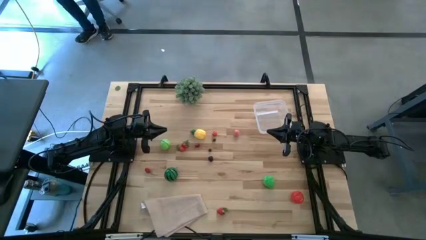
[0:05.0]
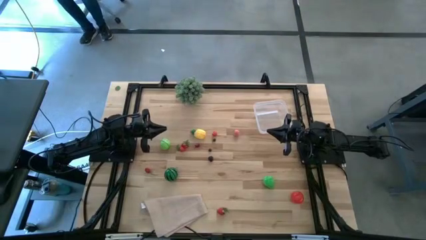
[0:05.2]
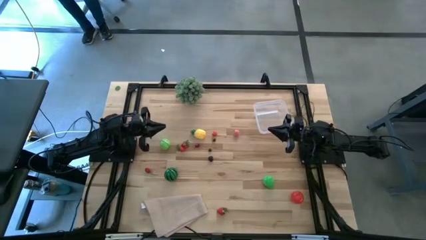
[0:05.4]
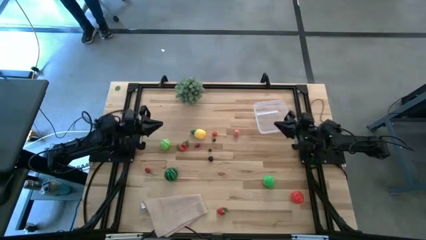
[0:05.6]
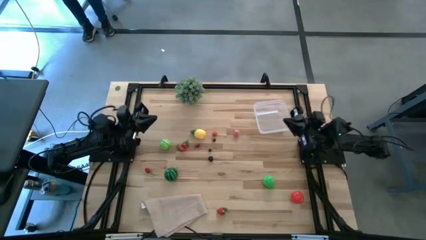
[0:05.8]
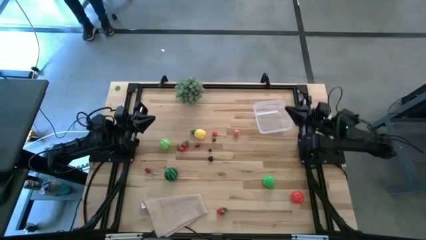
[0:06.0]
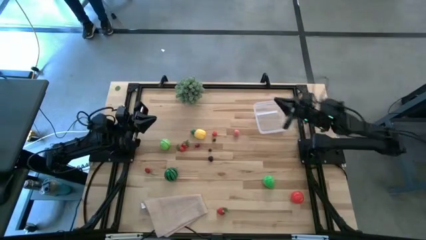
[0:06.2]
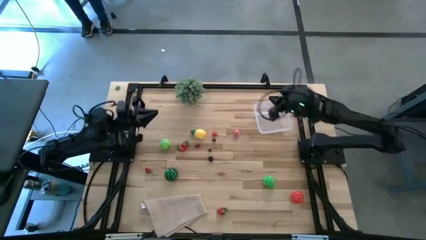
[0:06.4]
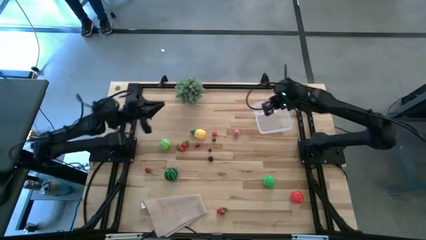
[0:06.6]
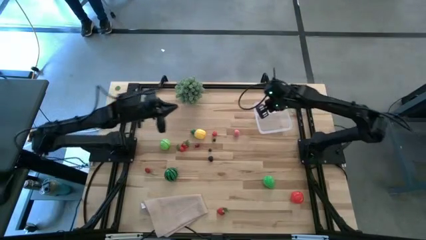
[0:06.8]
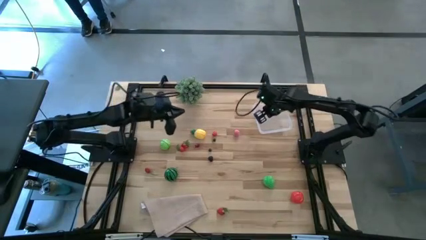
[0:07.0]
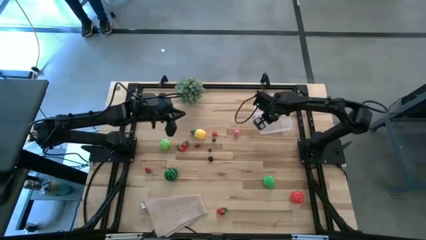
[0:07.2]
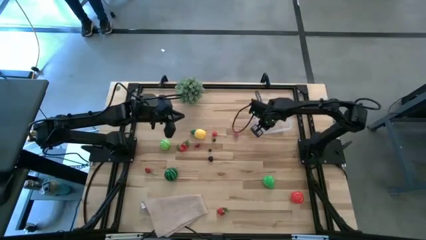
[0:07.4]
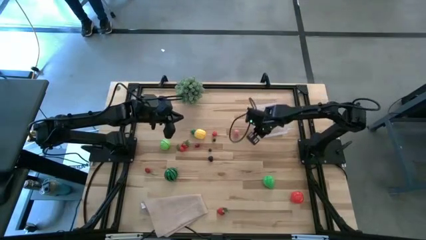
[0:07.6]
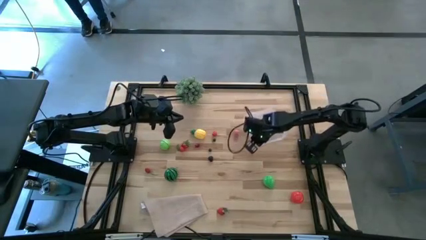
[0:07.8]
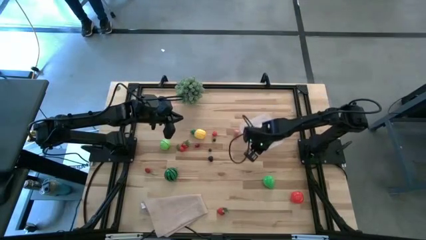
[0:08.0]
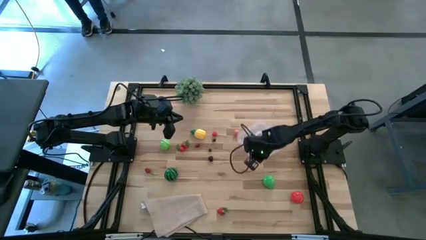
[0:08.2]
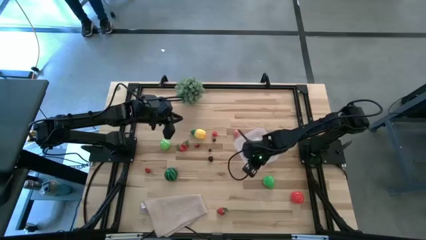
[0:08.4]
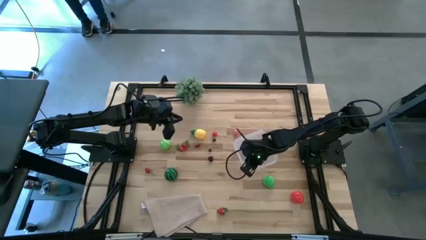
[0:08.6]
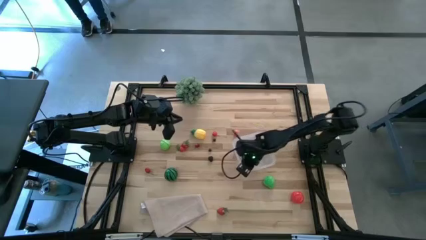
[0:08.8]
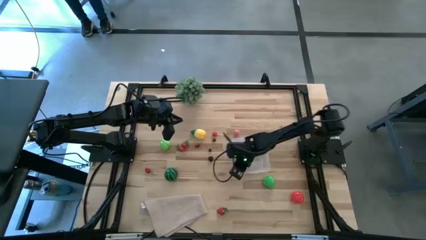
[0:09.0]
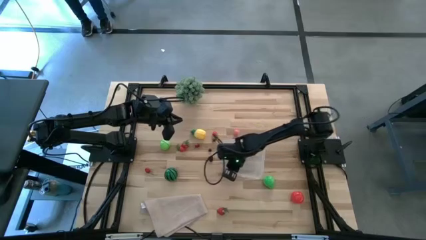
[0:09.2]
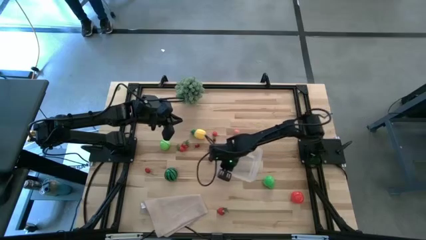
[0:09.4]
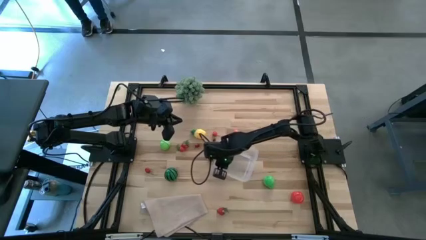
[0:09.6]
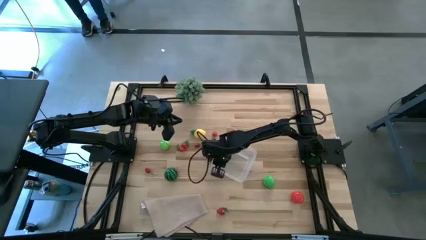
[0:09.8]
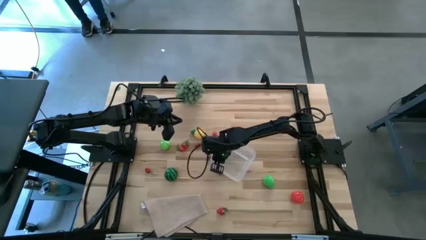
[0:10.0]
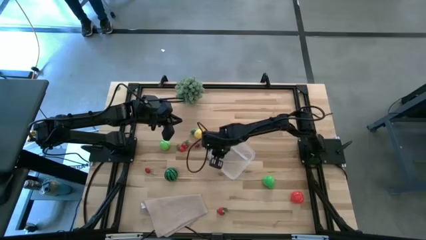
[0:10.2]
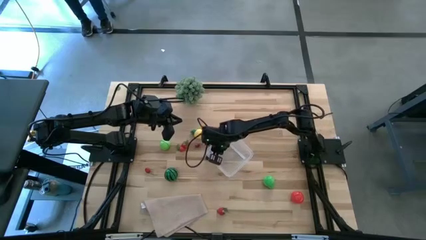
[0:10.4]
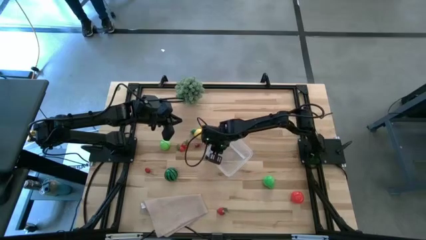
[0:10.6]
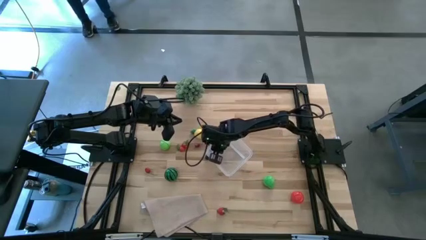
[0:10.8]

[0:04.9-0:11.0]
Task: Pick and placing Produce into tupperware
Move the transparent bin to the center of the table

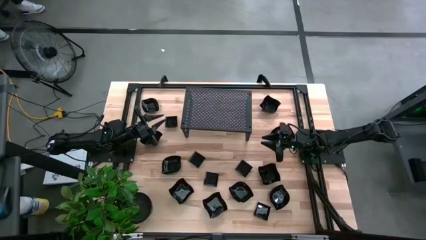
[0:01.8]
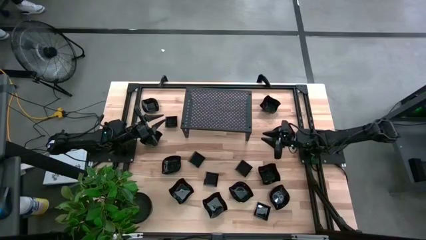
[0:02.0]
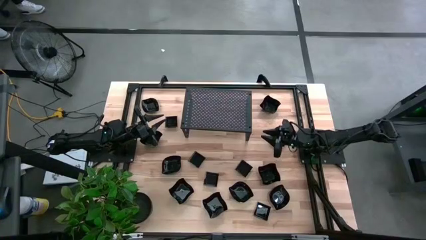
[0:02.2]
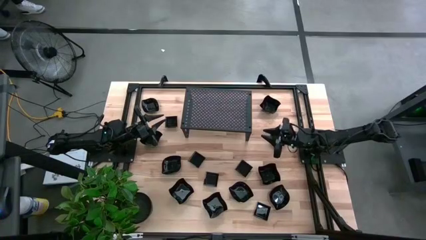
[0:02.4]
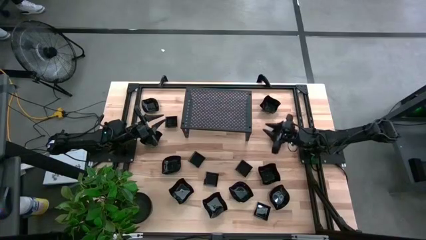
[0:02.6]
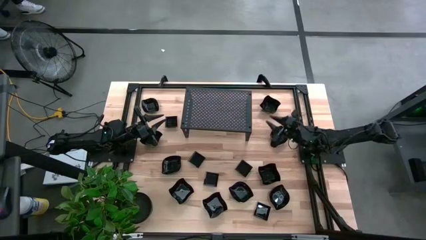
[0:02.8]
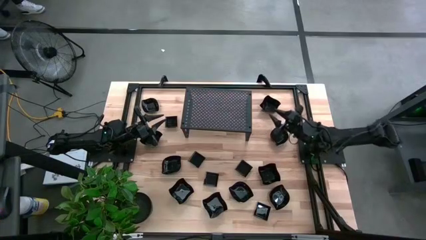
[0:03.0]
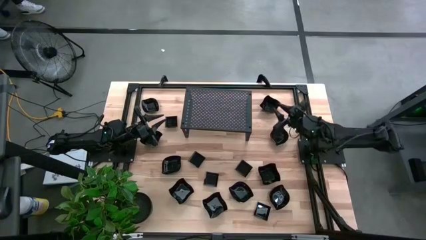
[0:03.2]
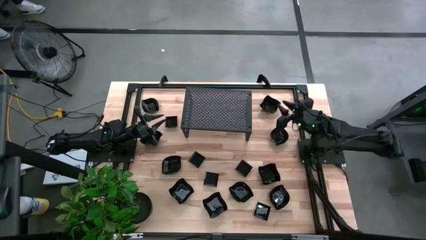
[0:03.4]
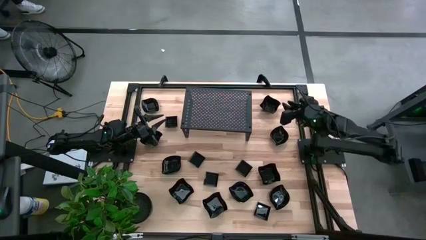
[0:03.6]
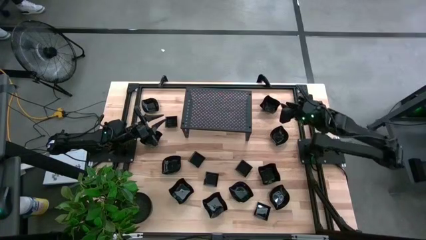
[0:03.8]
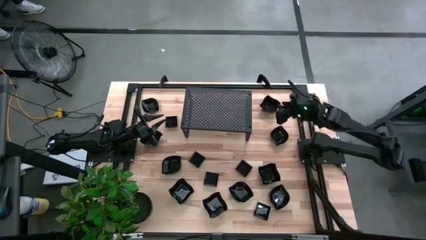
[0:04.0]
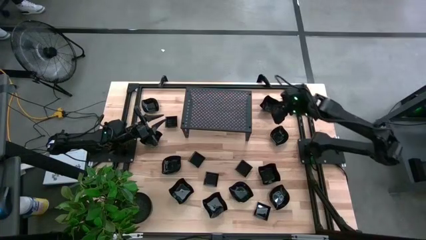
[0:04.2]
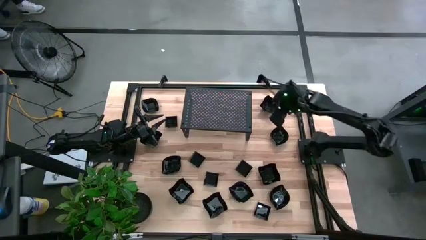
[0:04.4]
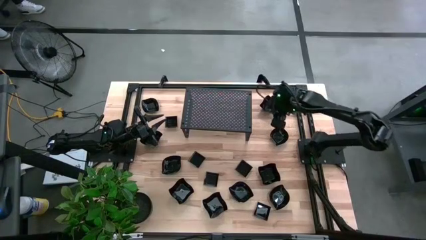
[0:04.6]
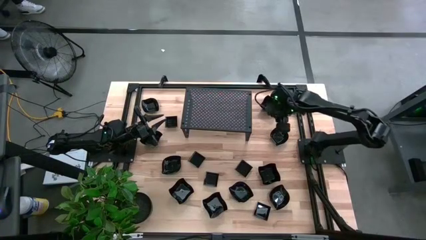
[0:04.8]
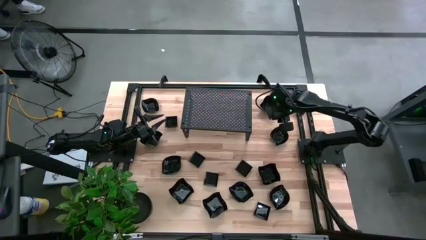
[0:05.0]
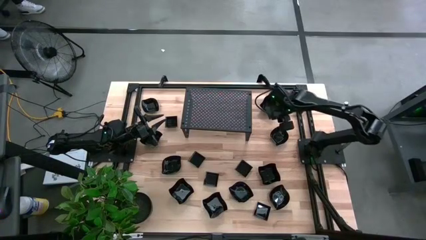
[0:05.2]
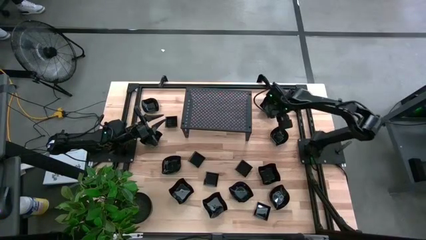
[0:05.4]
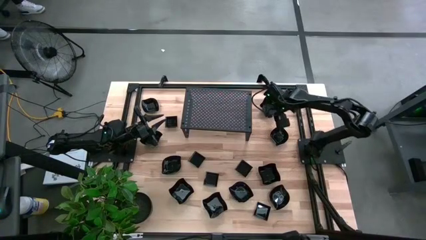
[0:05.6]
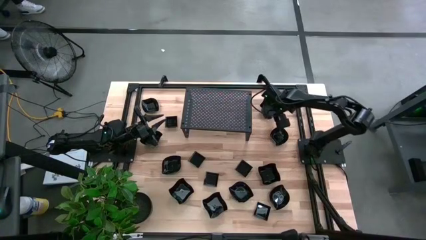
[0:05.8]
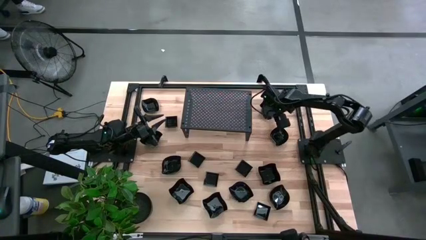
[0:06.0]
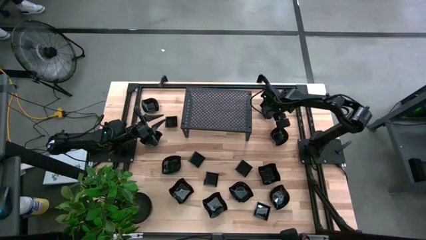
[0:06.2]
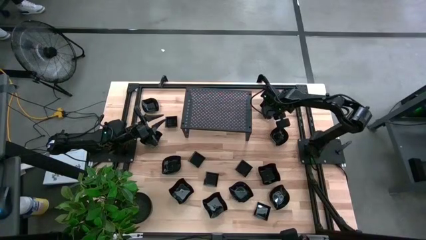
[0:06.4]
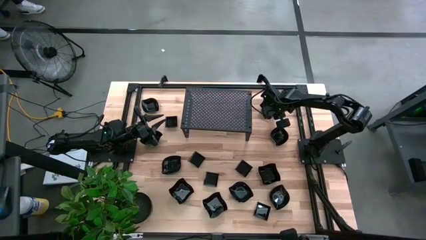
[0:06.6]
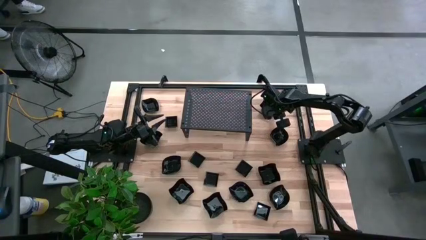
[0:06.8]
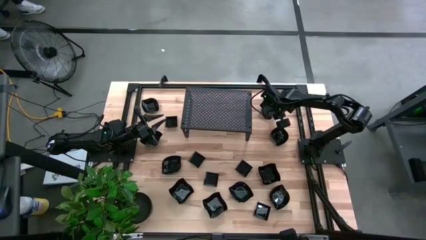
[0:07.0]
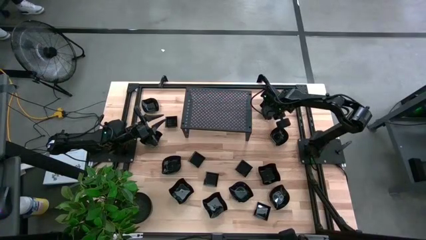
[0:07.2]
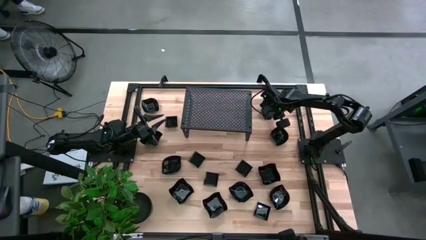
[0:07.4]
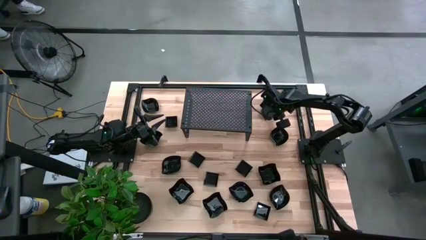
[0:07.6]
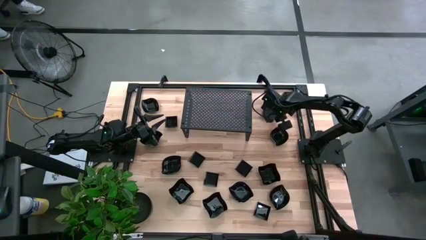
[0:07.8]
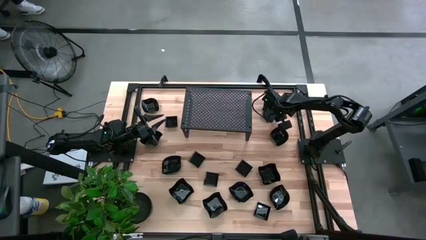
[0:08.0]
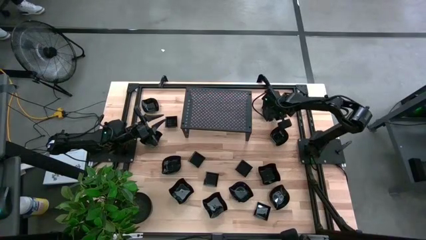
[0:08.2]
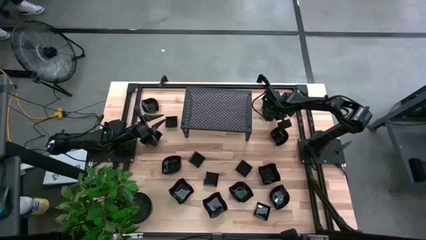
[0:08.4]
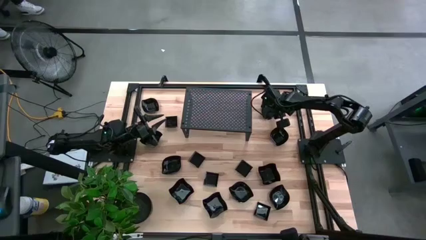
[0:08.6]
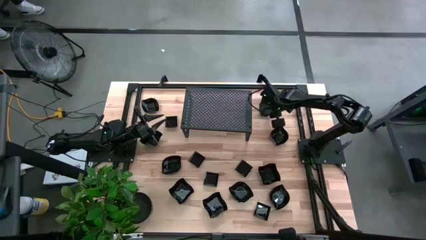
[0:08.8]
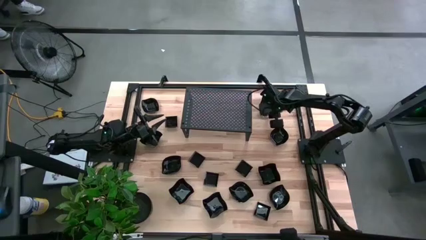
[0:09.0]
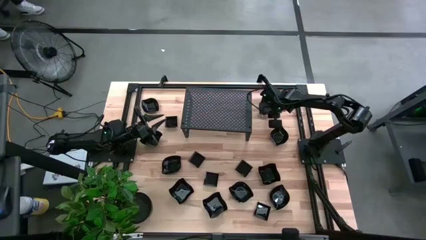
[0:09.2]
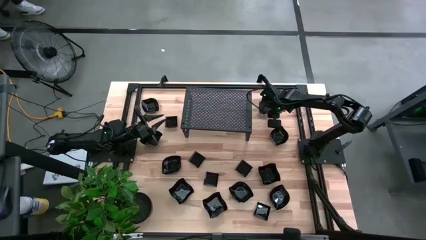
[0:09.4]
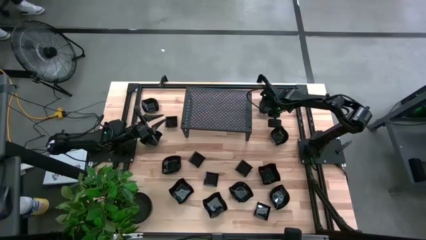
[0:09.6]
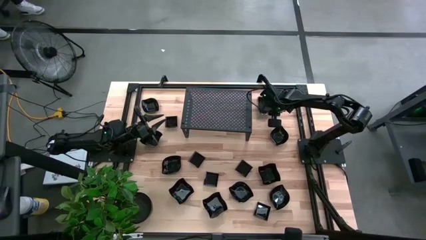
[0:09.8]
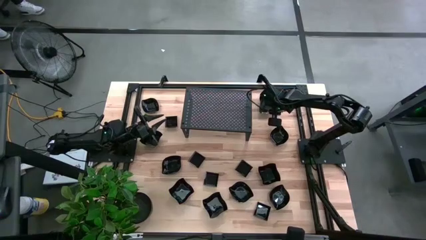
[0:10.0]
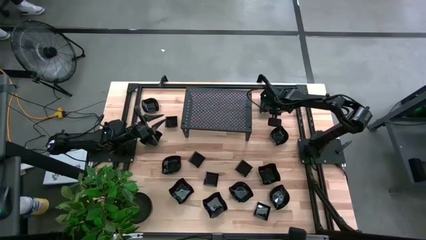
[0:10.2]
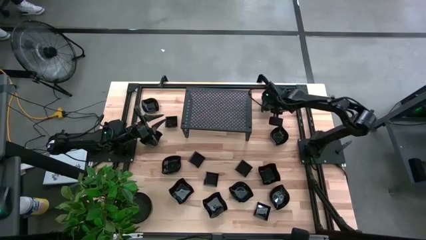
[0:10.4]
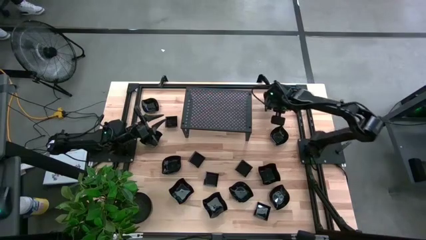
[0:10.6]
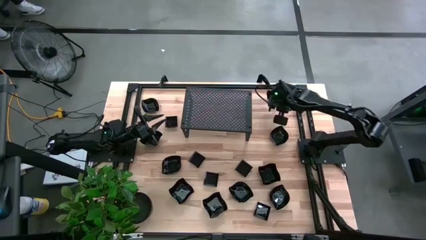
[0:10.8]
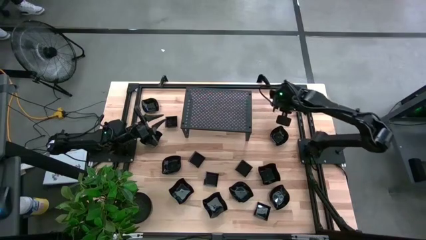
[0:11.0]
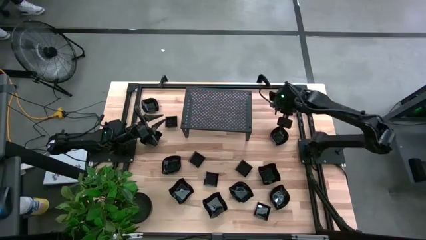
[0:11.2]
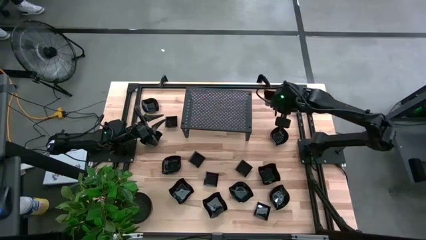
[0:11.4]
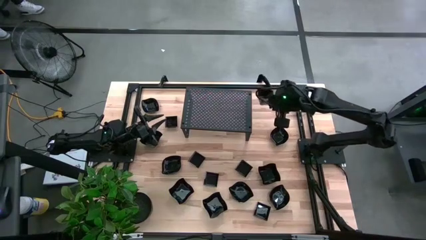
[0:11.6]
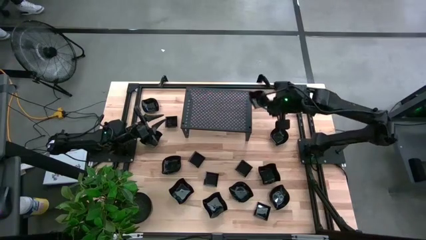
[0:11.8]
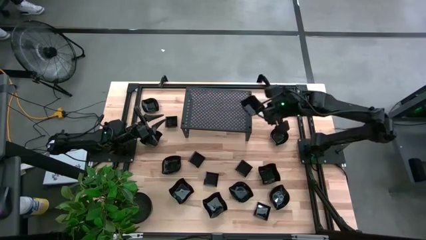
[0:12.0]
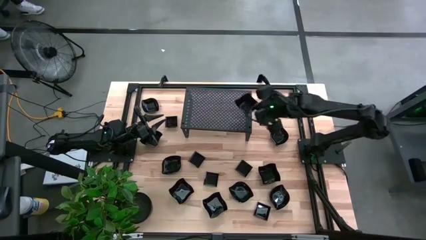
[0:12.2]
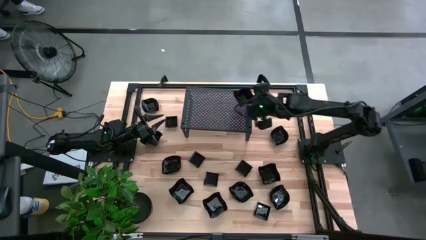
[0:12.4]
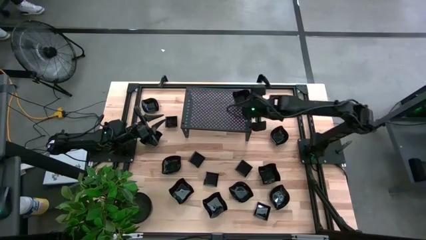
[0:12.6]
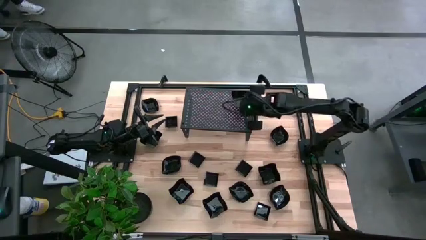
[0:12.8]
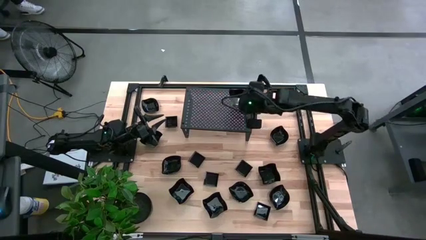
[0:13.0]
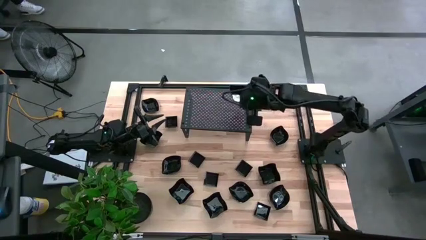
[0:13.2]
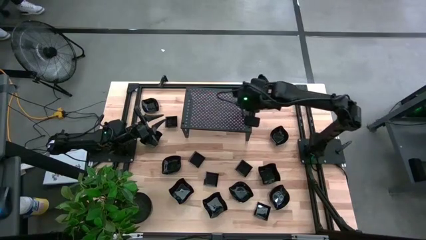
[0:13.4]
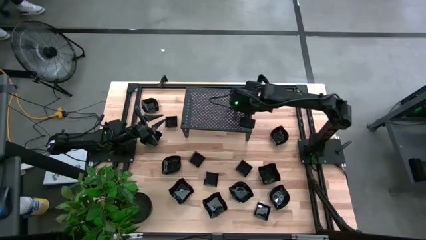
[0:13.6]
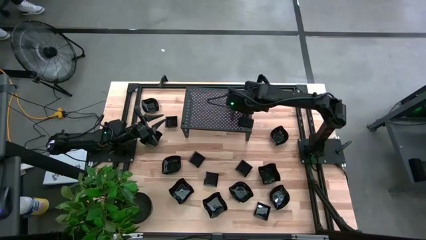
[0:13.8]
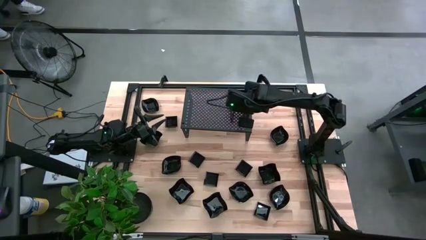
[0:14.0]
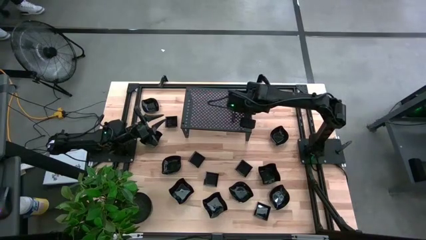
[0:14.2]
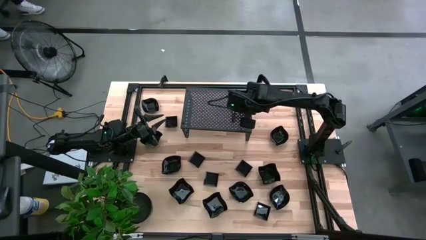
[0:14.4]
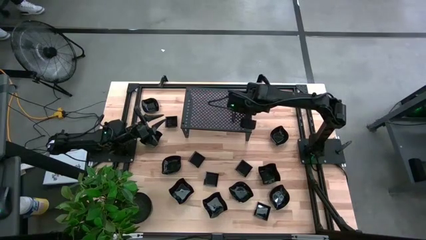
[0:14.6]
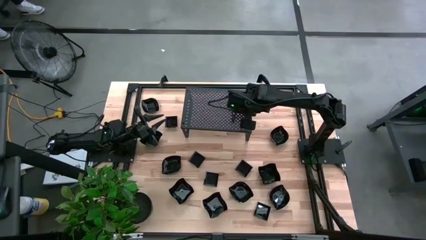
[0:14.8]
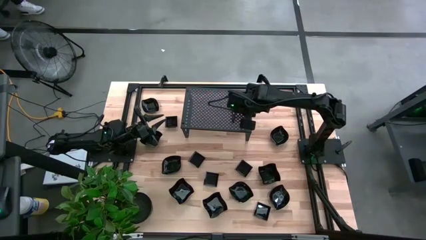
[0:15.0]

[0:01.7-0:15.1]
Task: Pick & Place Mini shaped plates
Put the distorted square plate on the shelf
